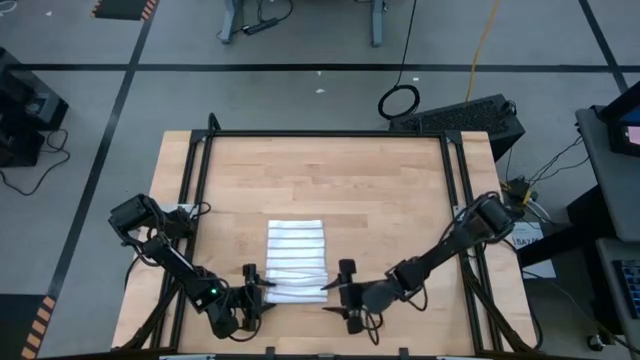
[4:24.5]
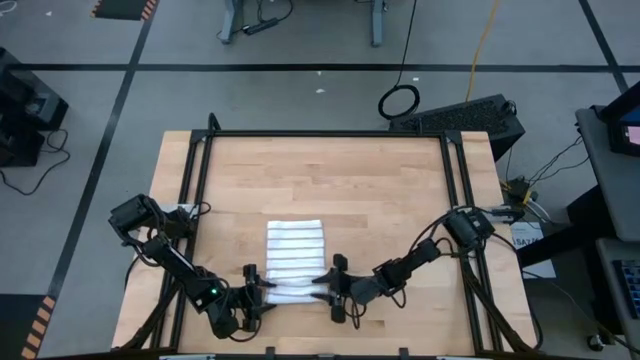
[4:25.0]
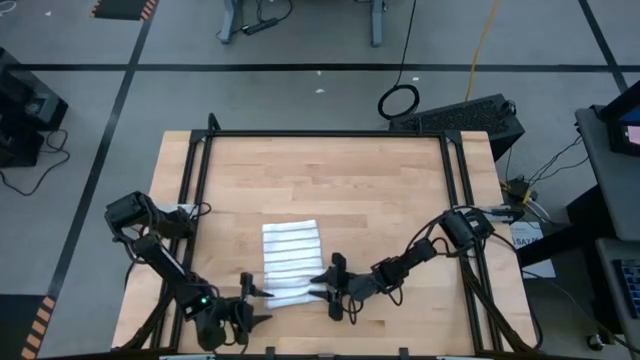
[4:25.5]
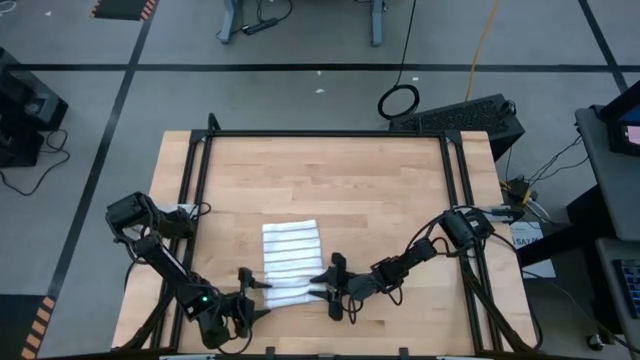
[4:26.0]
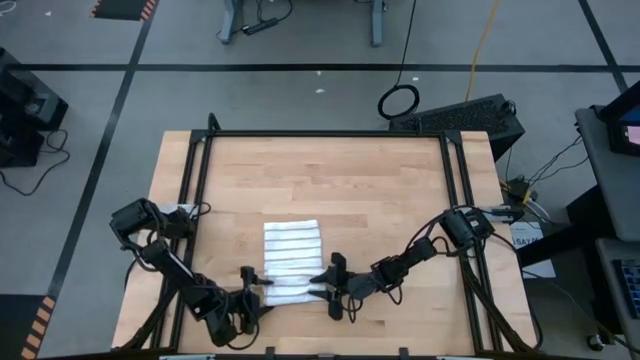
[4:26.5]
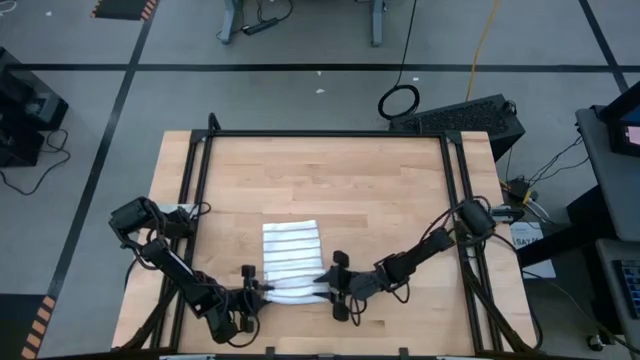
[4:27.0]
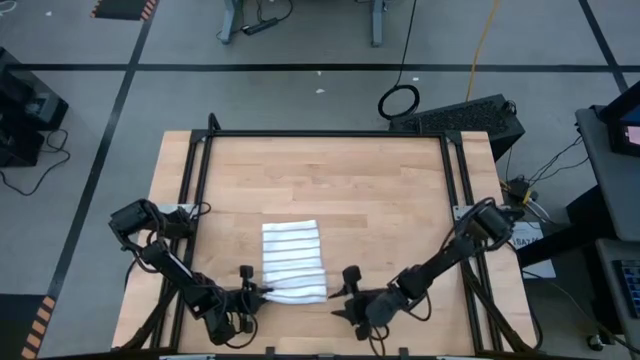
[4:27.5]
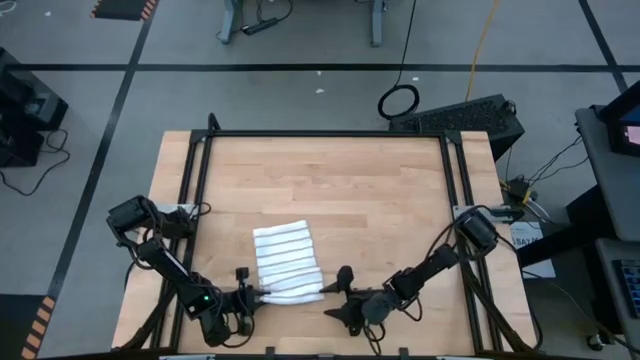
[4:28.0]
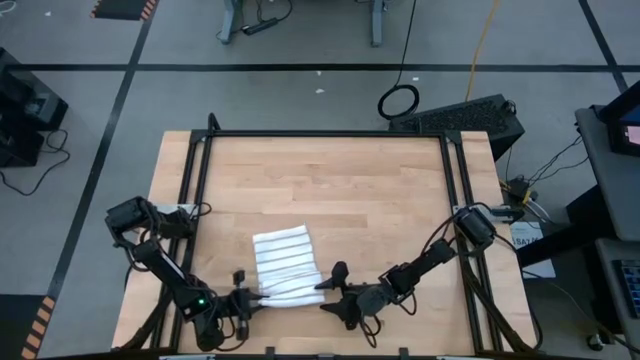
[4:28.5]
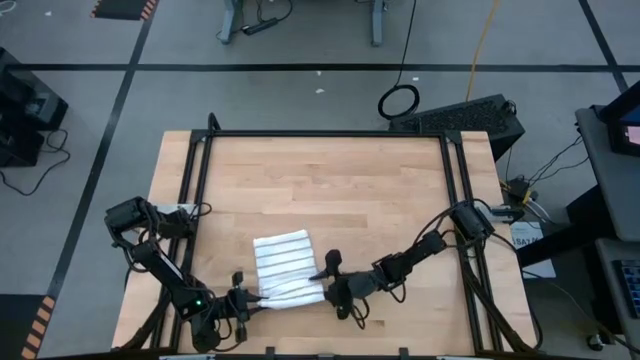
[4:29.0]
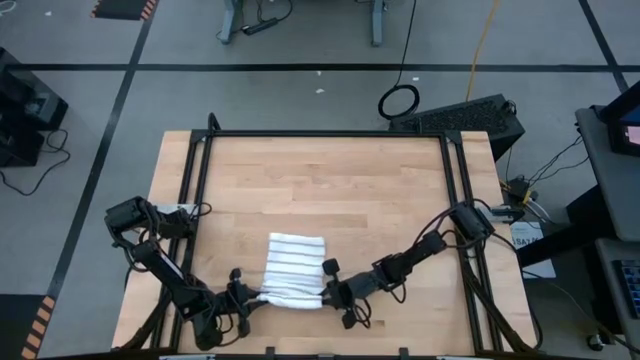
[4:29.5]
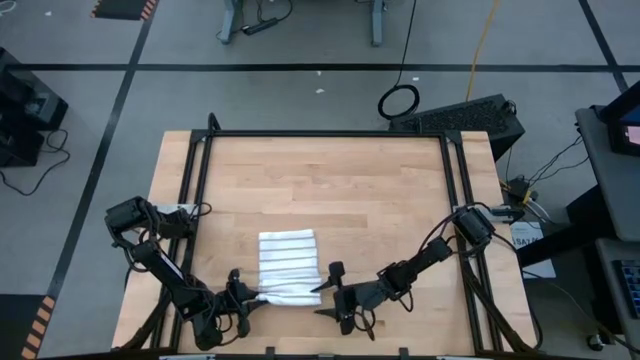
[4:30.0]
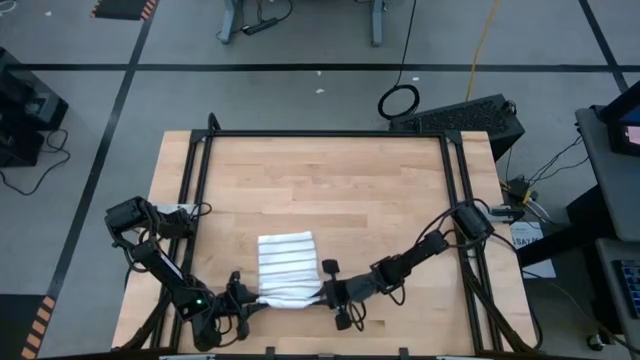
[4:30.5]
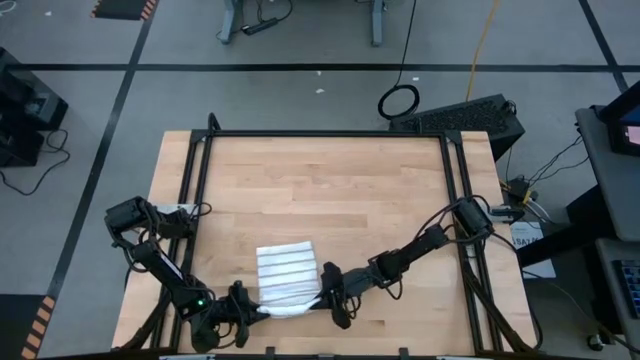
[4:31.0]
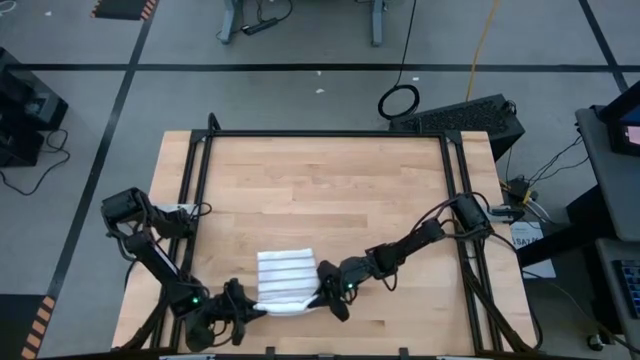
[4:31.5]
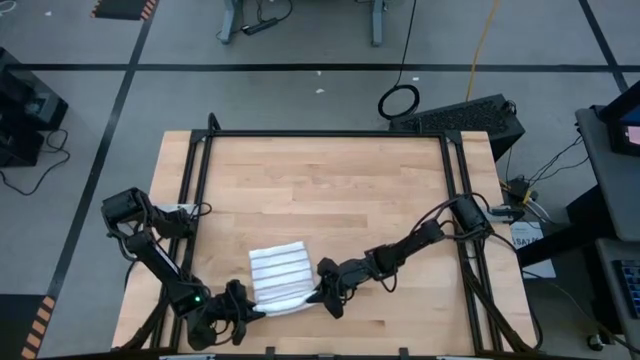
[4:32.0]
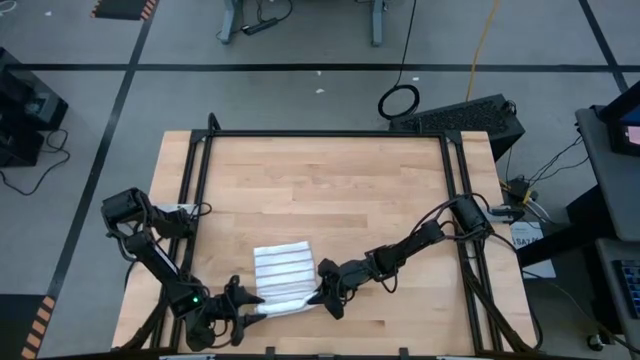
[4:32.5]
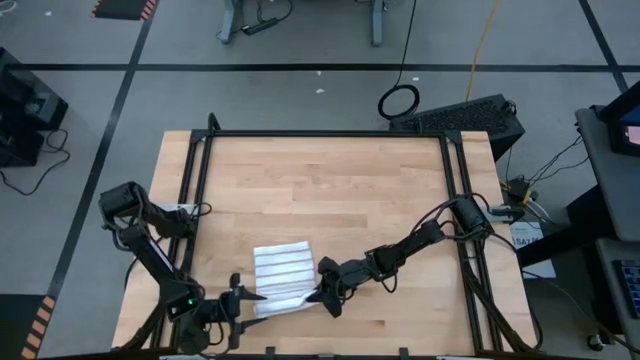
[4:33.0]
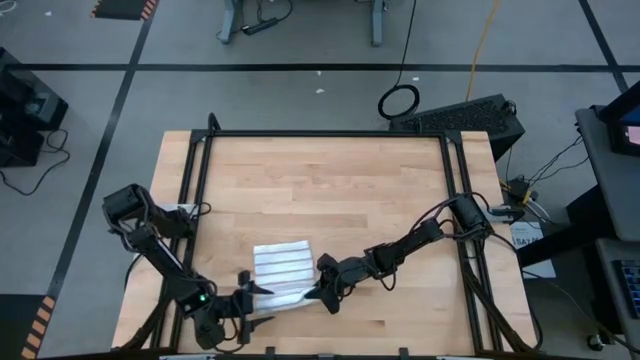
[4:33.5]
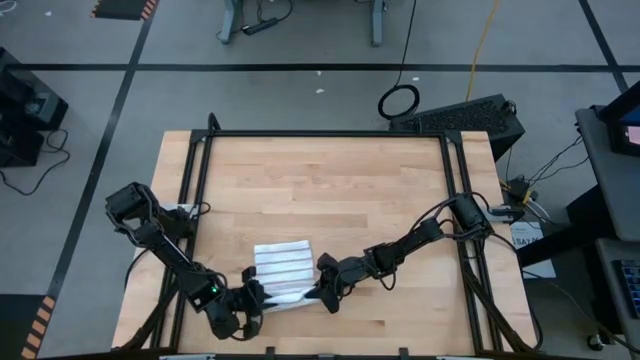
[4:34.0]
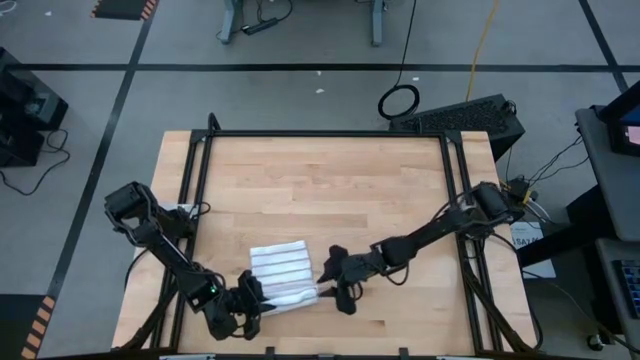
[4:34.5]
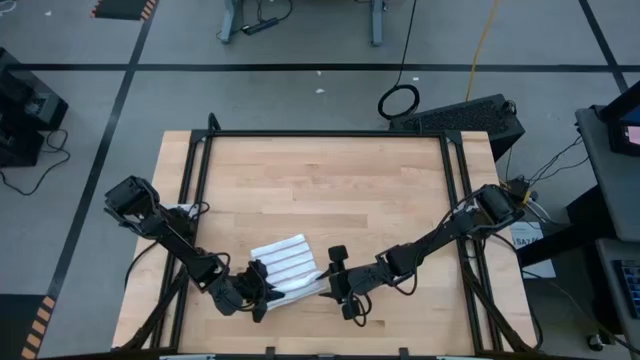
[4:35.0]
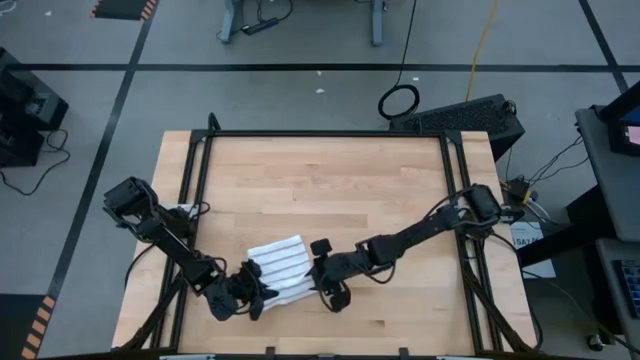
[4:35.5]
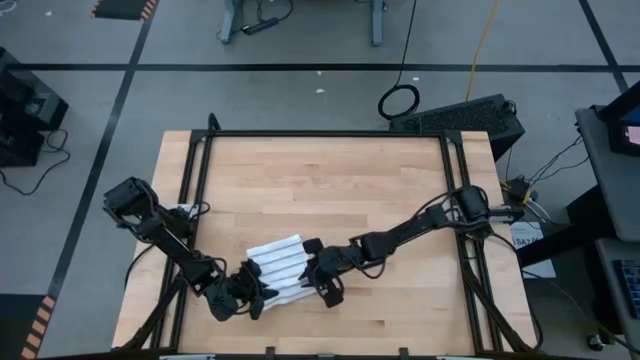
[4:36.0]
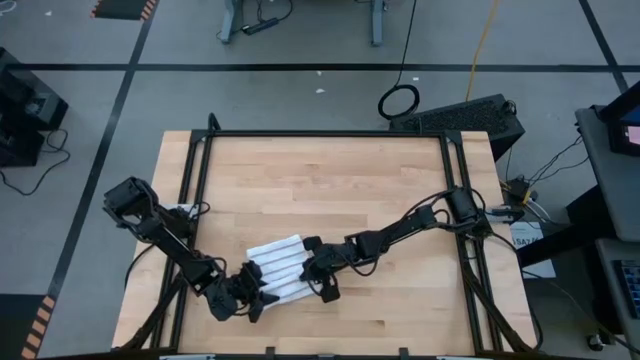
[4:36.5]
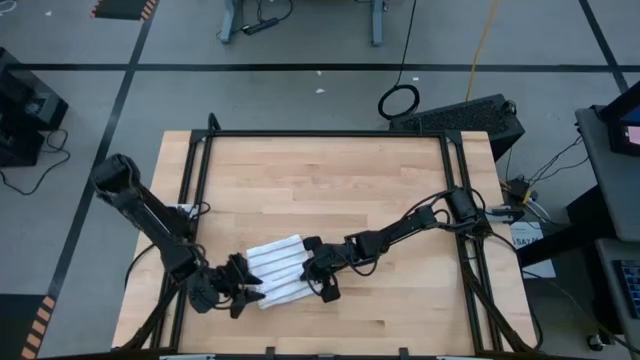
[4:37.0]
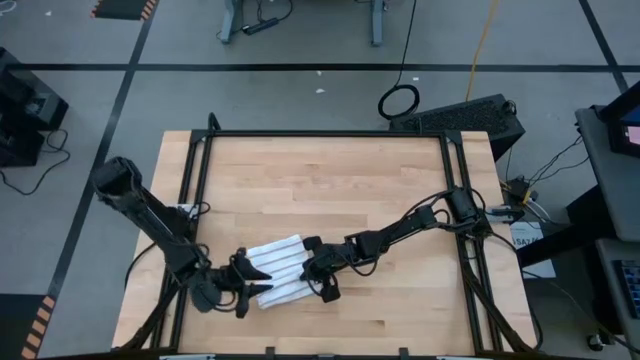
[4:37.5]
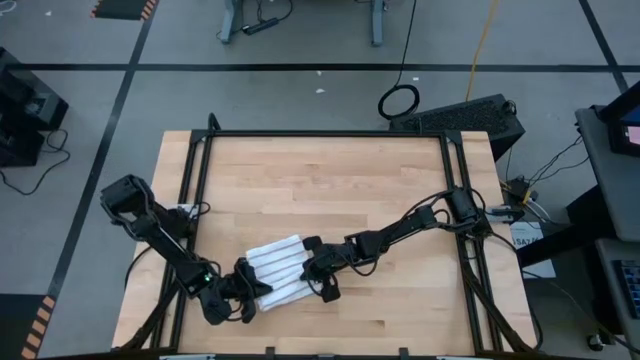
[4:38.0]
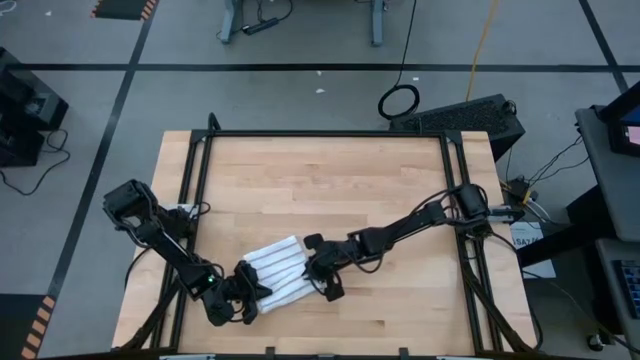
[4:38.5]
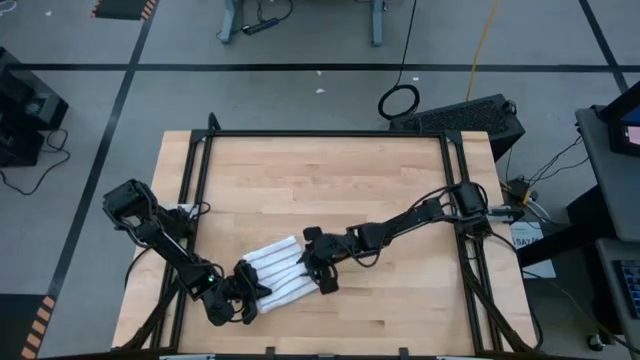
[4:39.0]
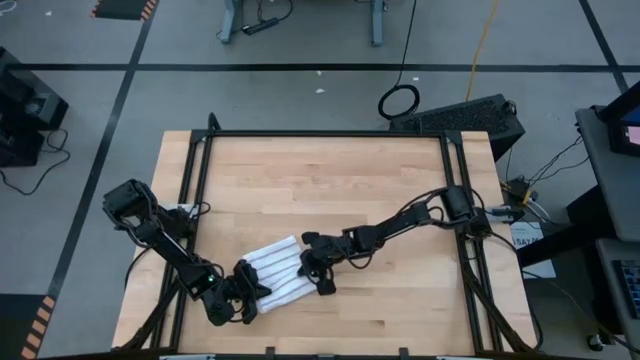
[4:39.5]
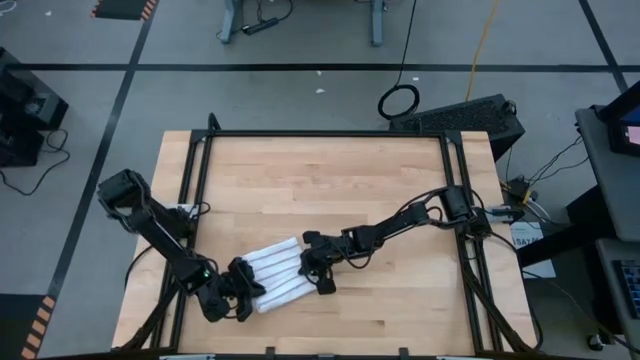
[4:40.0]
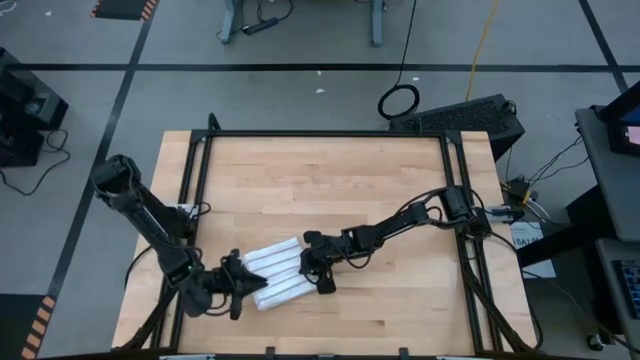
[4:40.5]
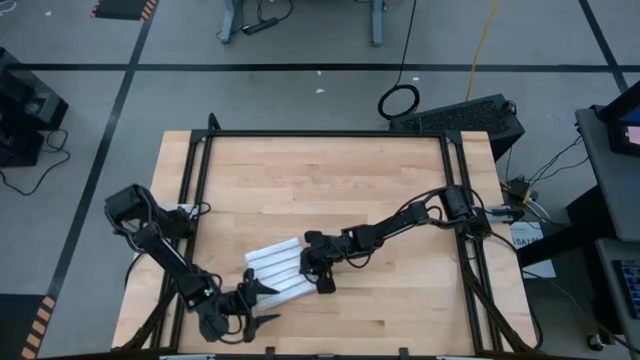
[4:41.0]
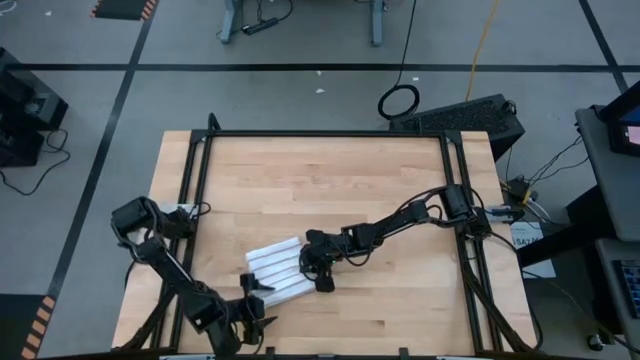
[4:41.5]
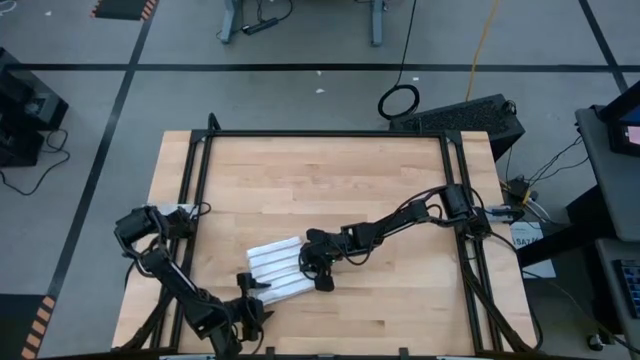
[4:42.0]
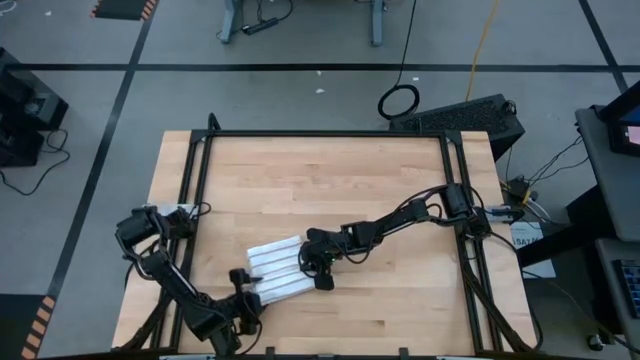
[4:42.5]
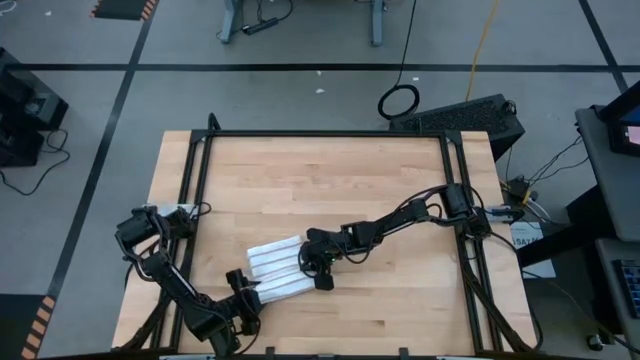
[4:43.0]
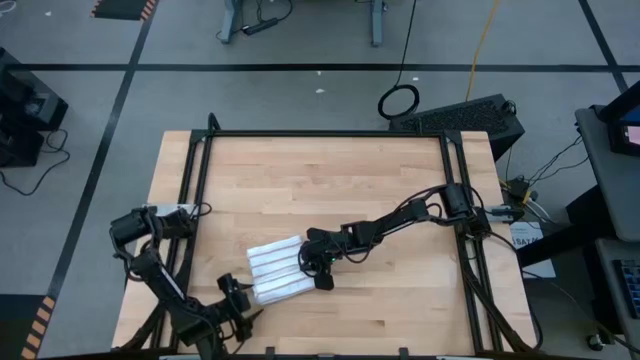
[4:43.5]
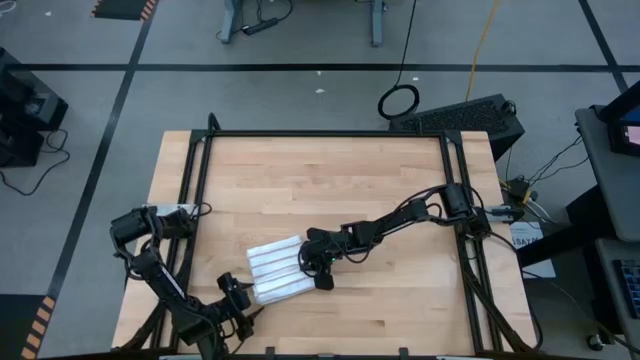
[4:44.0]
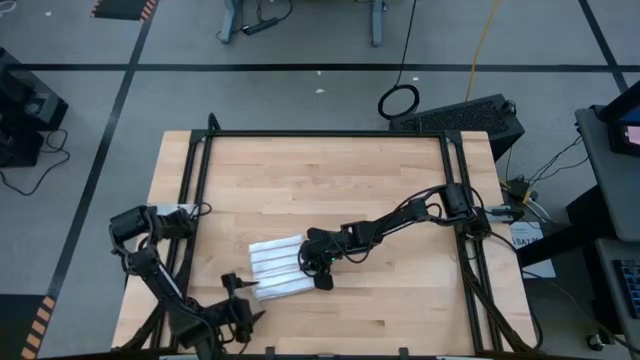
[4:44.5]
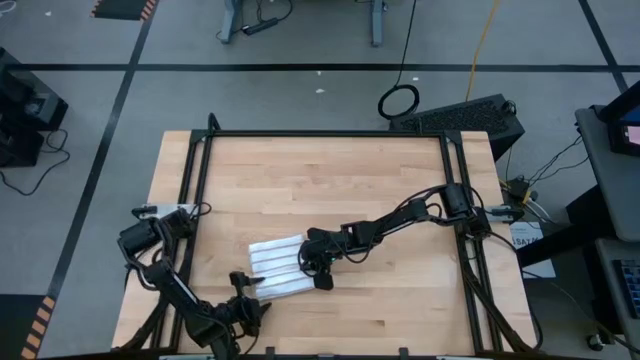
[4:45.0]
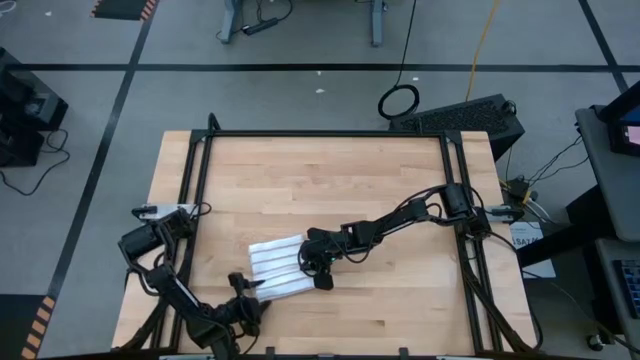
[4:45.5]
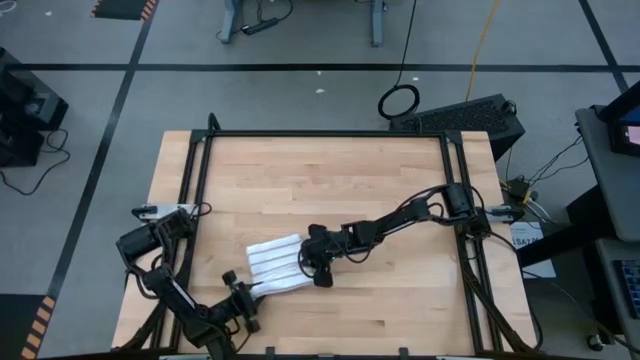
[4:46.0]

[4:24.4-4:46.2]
Task: Roll towel
Roll the white towel
